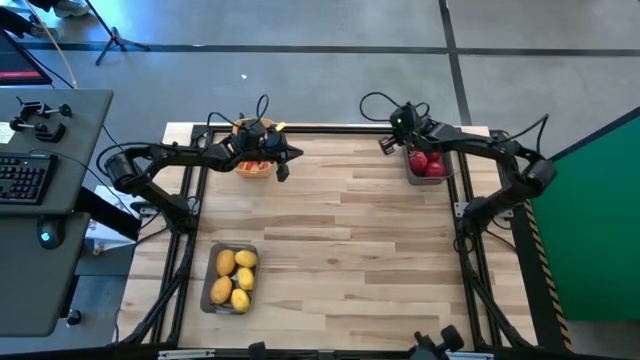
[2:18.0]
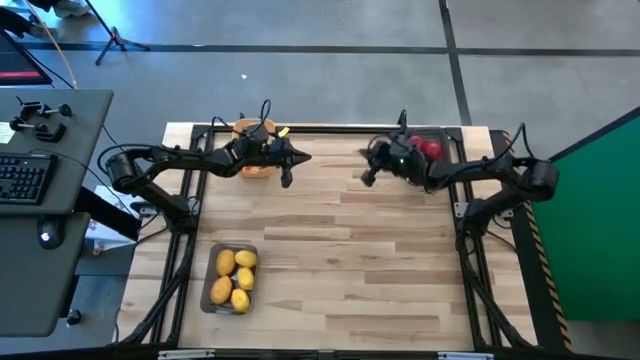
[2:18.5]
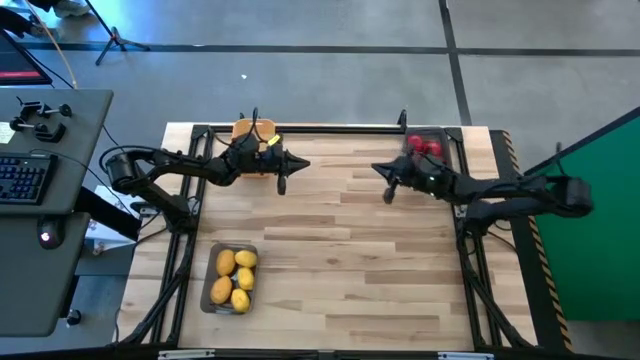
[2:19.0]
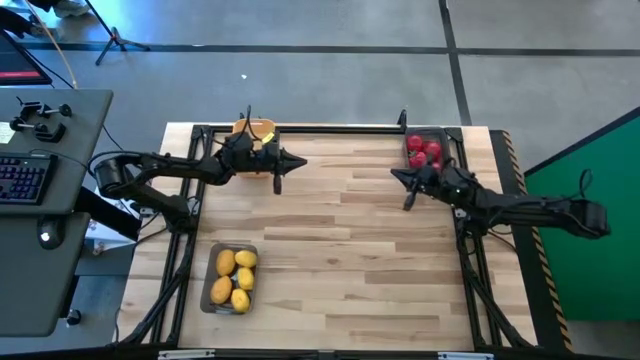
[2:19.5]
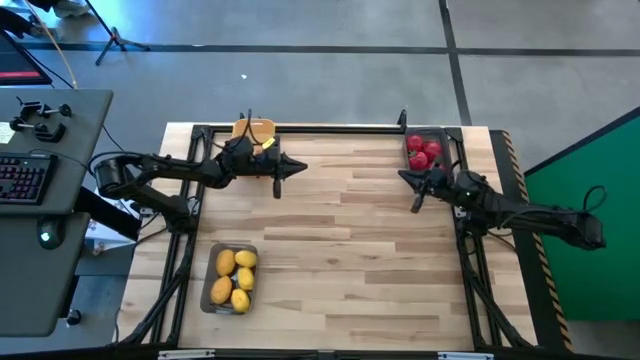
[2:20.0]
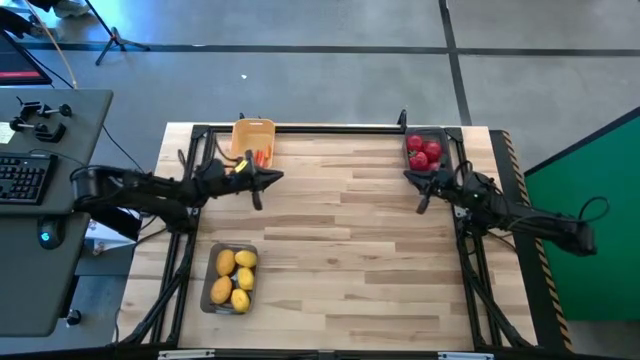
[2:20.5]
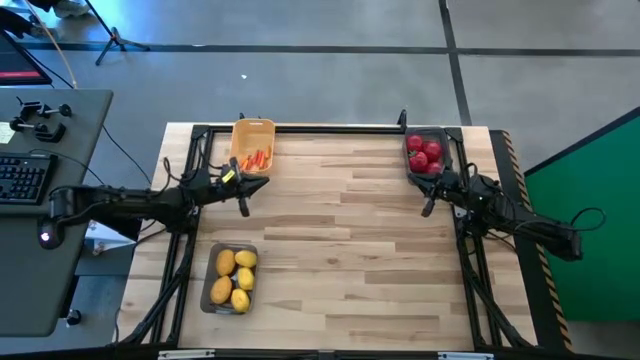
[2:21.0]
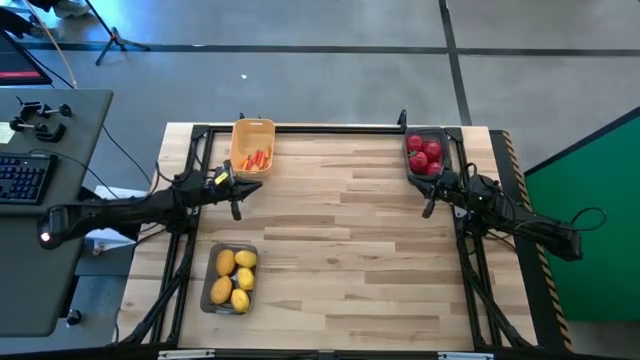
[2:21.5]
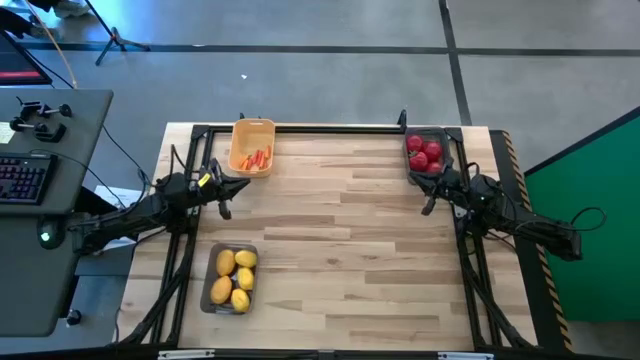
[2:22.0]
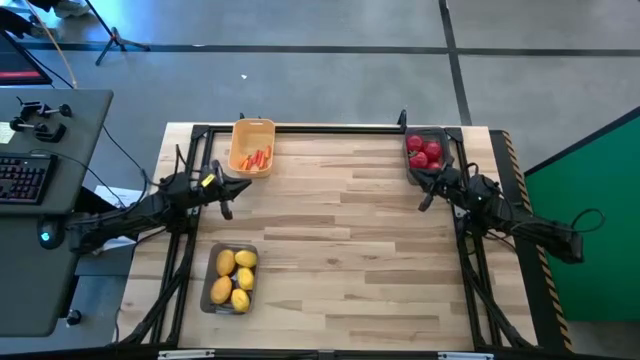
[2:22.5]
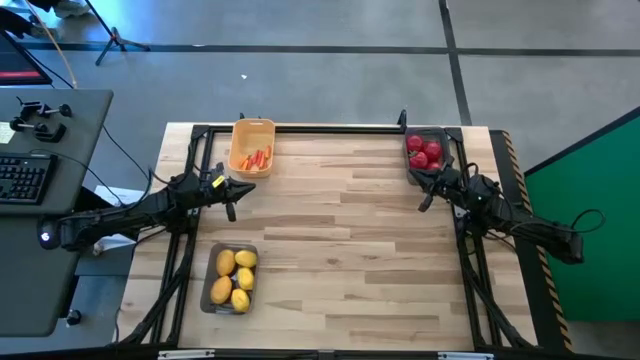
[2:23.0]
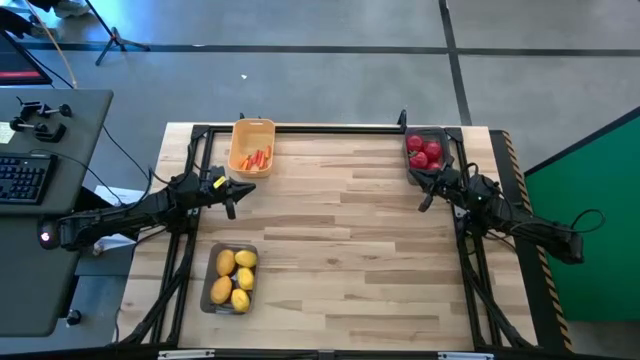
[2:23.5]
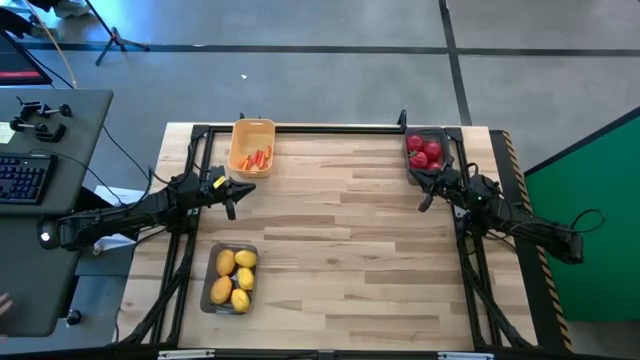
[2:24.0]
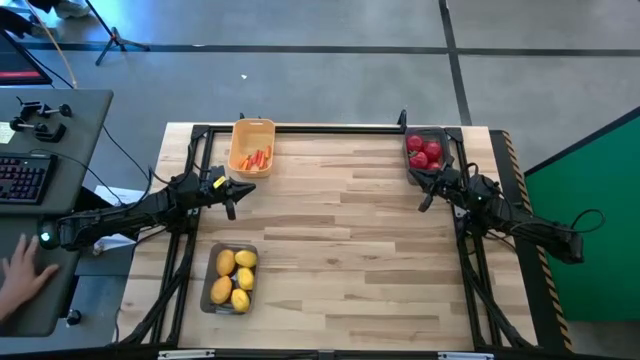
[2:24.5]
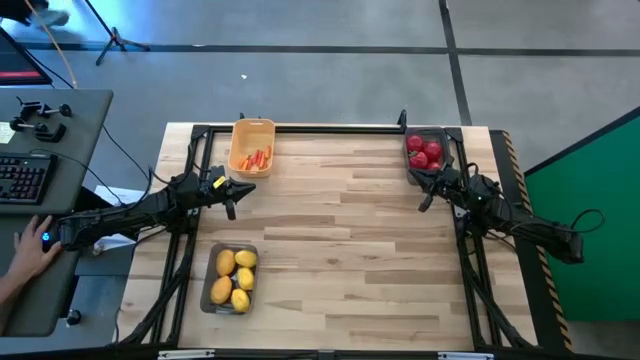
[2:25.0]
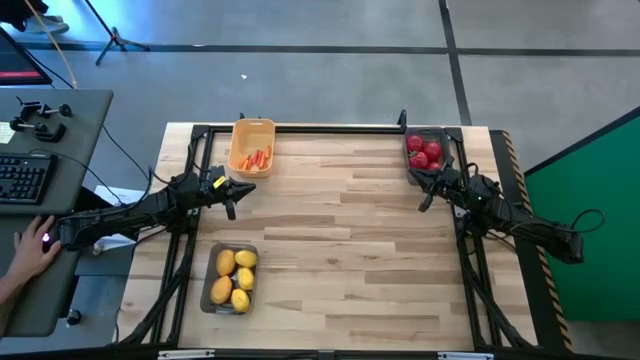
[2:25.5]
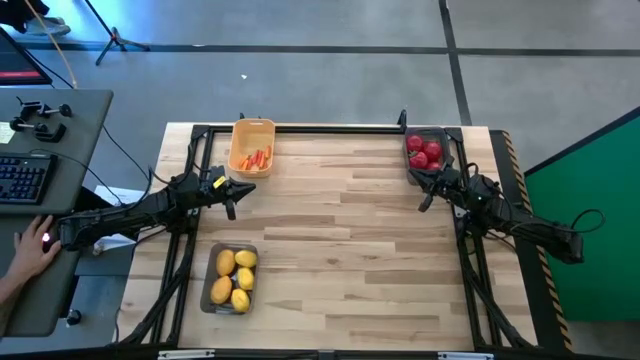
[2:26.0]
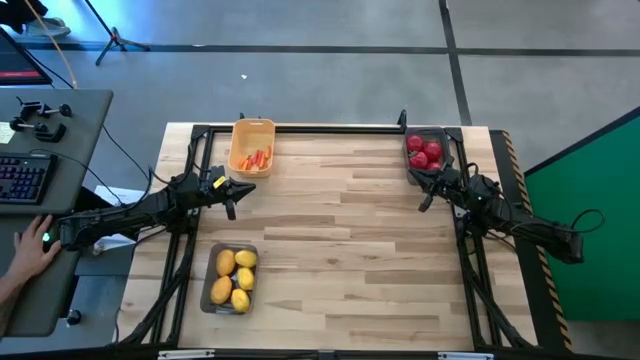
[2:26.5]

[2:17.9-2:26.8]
Task: Sort produce into baskets
Return to Home Position

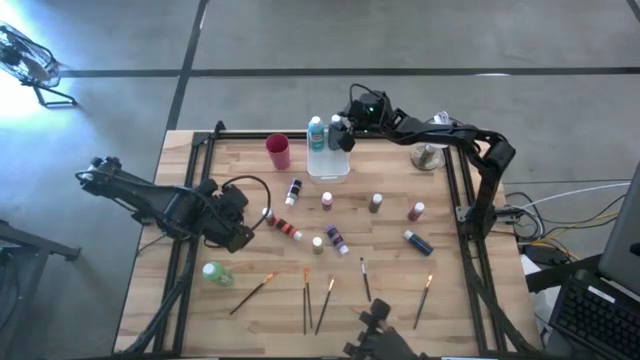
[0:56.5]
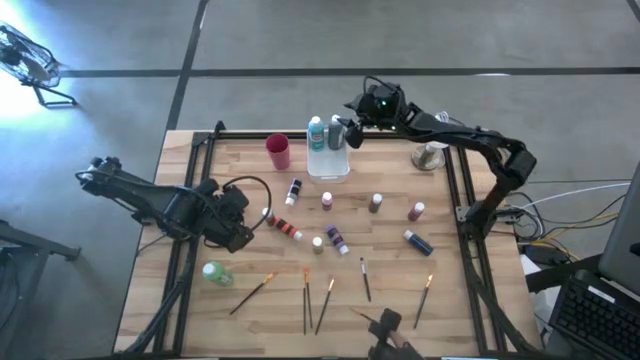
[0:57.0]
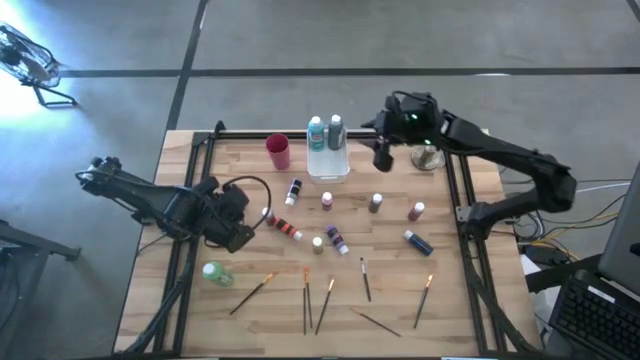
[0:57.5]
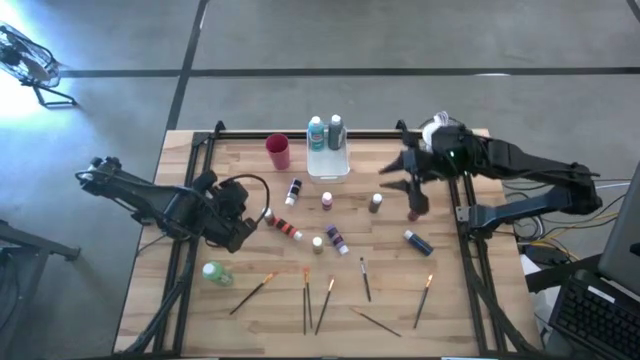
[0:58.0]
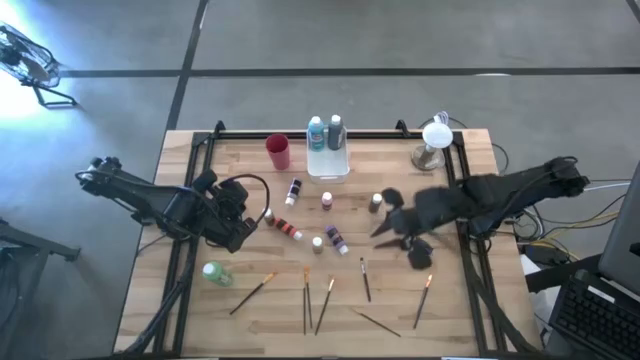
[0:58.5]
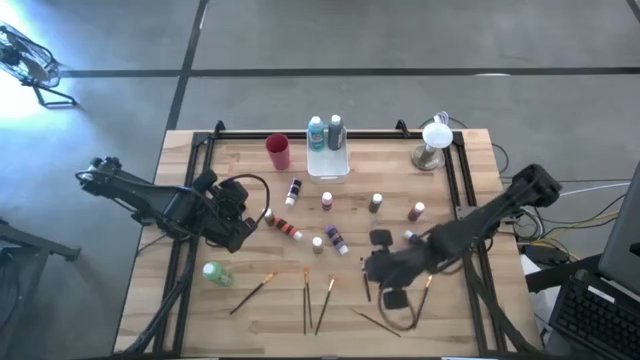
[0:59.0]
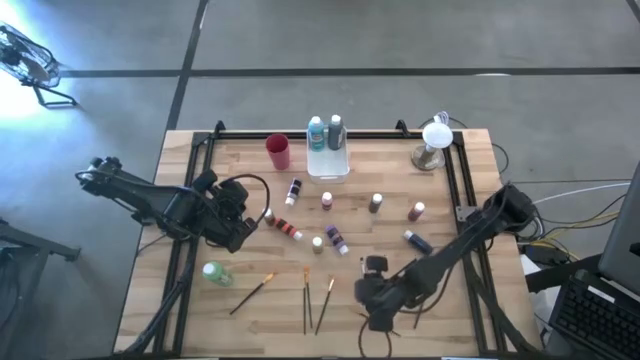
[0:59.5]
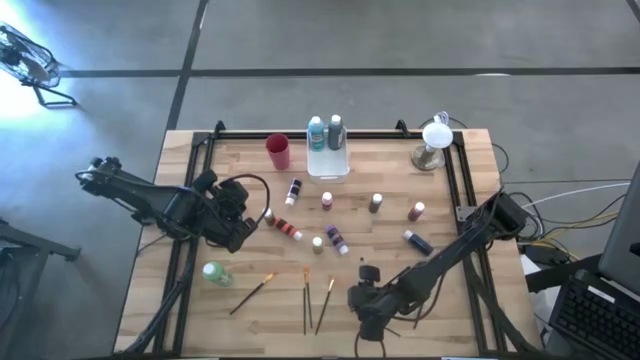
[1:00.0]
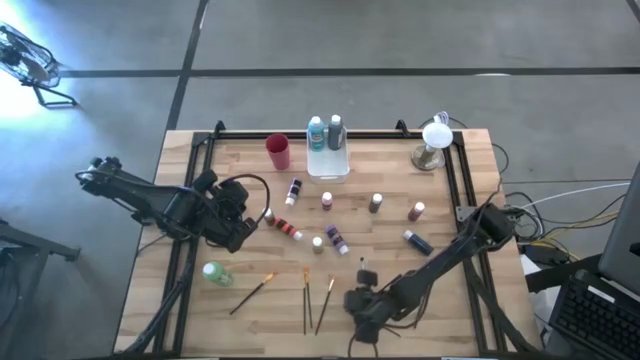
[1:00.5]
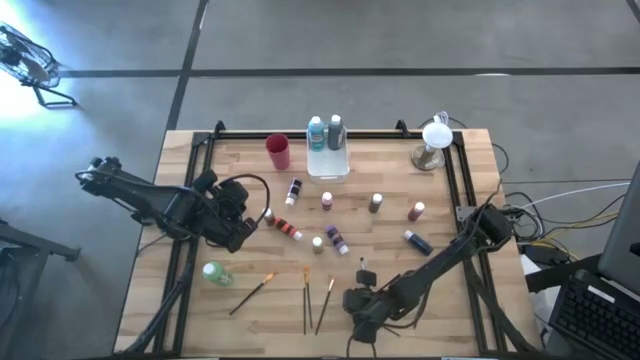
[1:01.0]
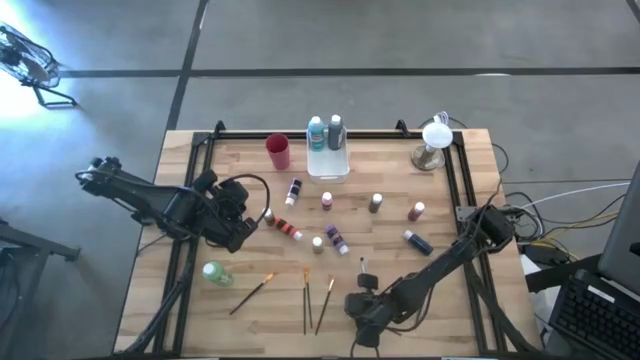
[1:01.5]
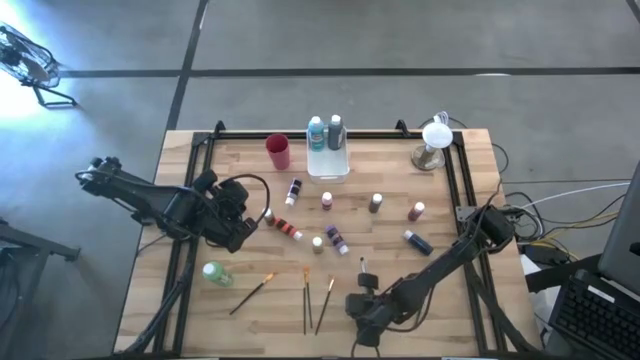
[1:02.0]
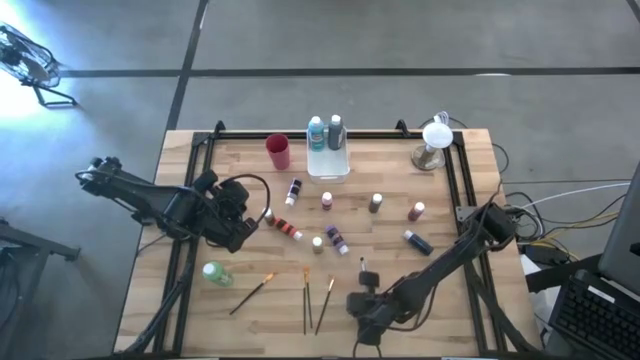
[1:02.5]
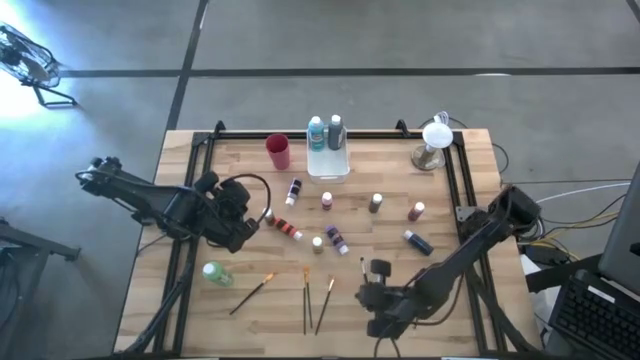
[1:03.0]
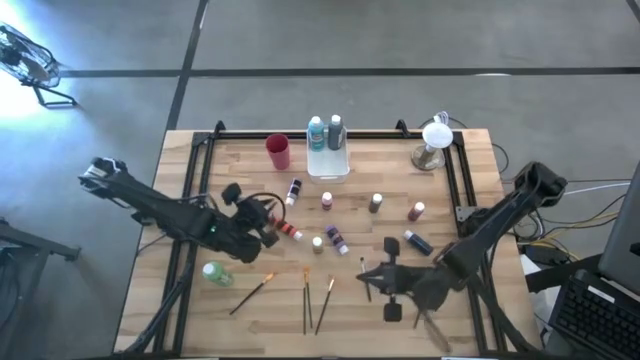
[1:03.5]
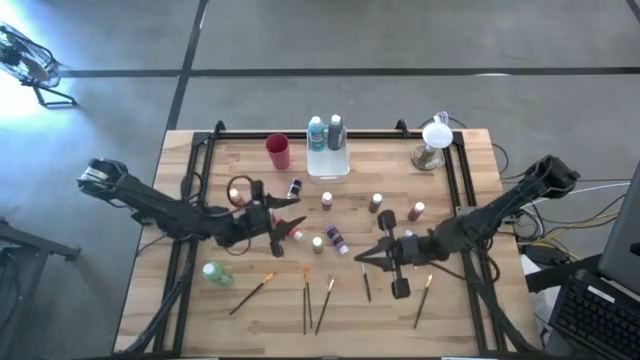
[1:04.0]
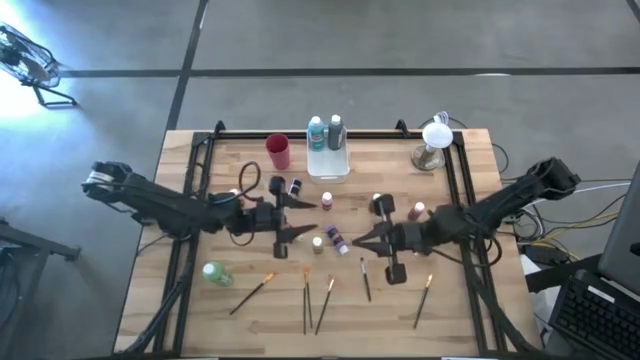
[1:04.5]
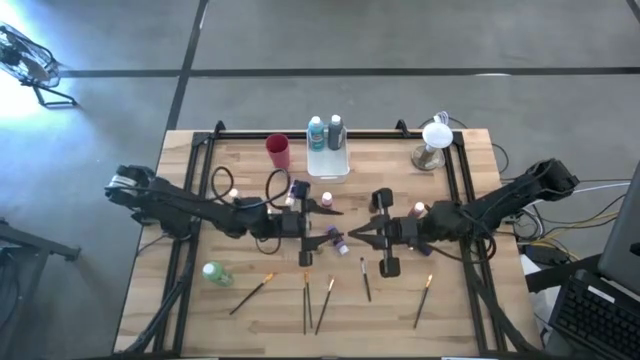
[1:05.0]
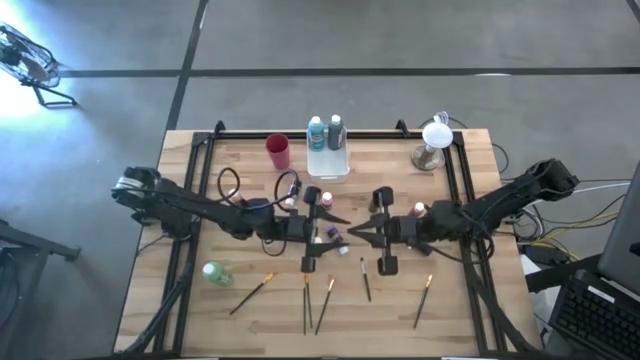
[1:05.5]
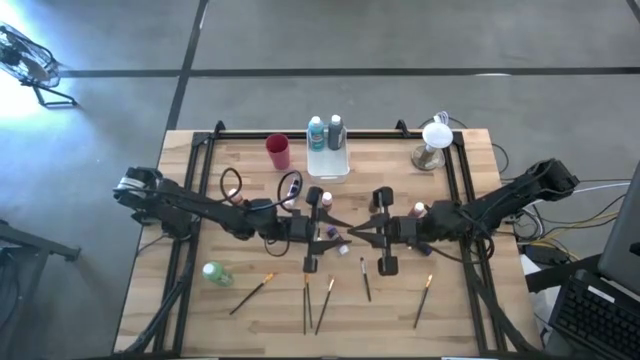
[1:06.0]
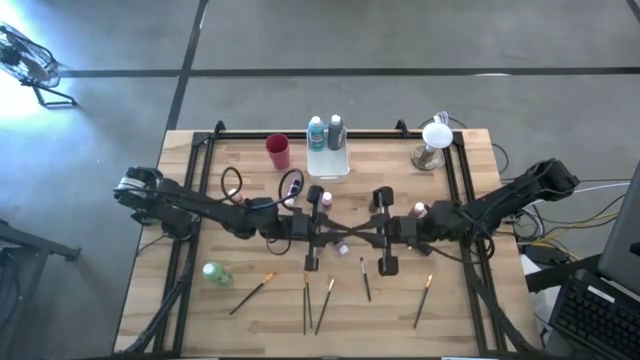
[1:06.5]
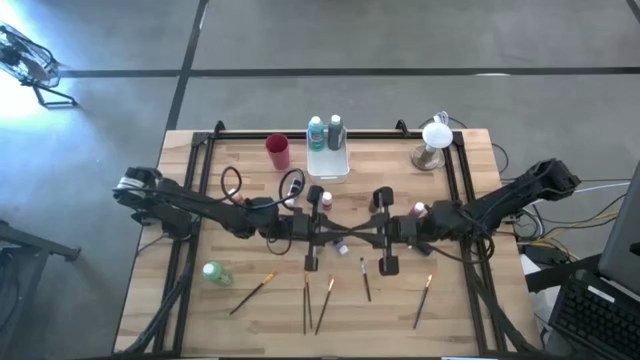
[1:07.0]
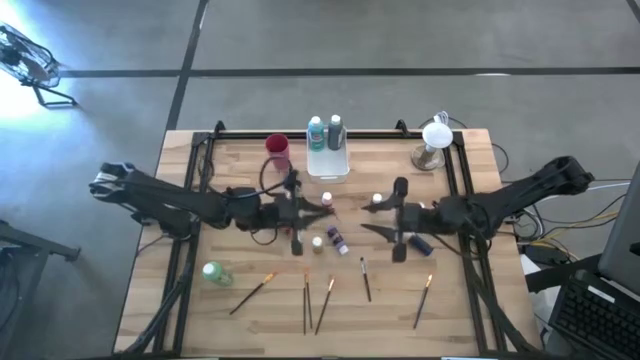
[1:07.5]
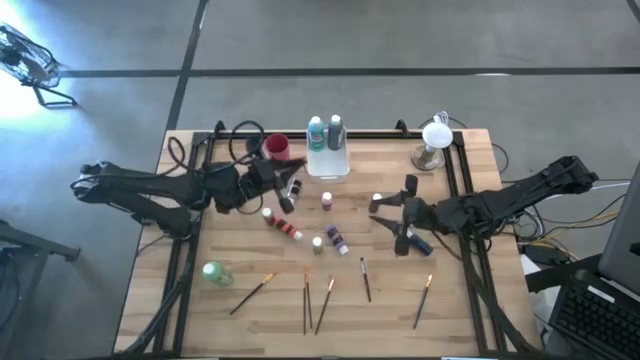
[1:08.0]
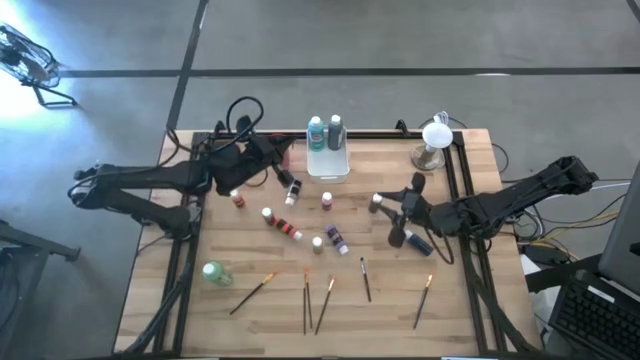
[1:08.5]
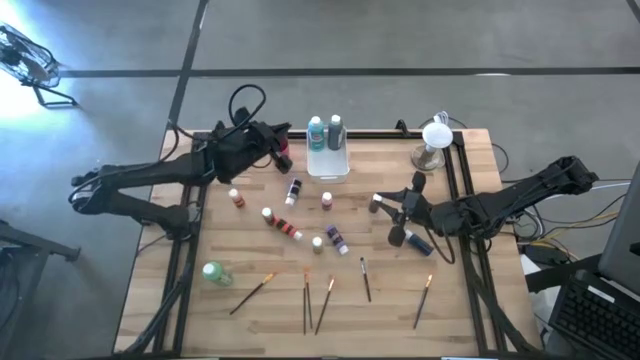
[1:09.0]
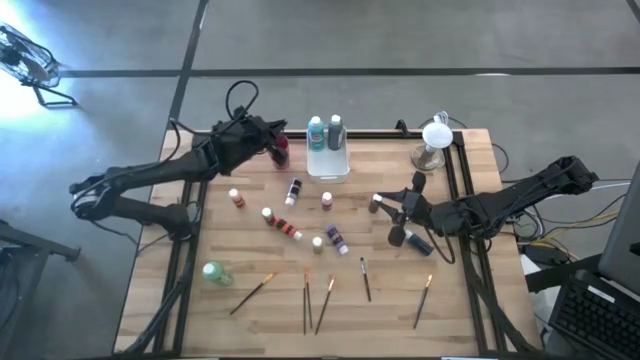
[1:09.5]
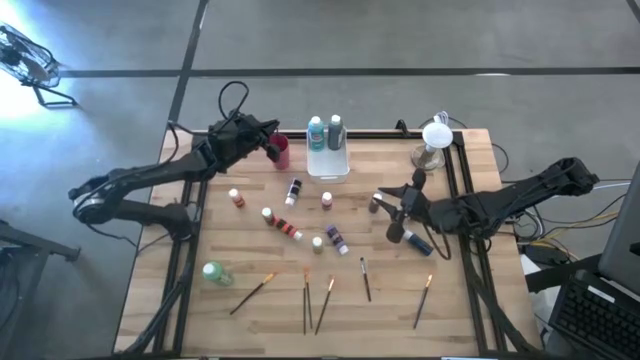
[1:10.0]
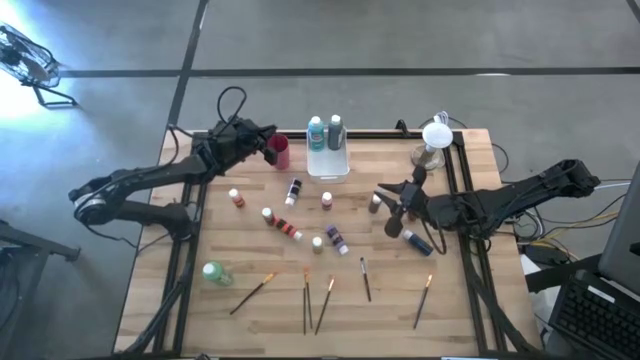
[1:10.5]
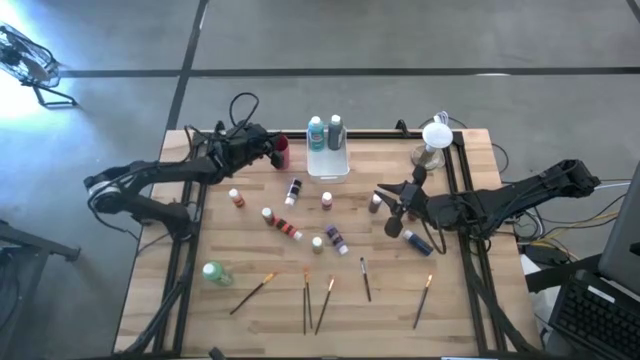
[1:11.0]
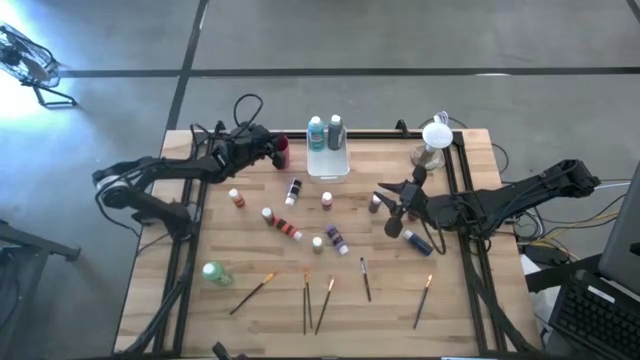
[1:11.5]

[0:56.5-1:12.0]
Task: Pick & Place Paint Supplies
Put the gold paint brush into the pink cup
